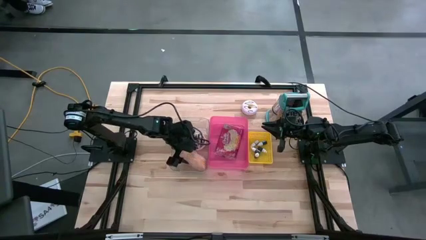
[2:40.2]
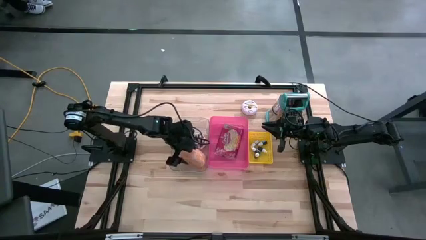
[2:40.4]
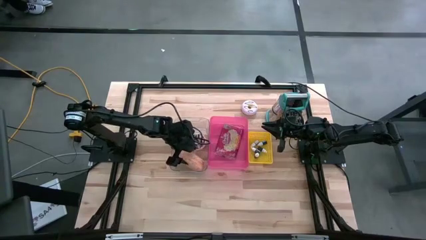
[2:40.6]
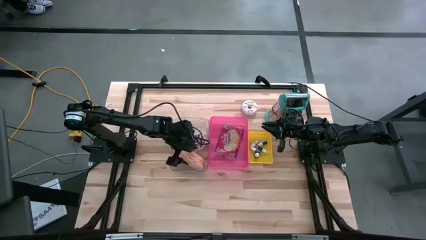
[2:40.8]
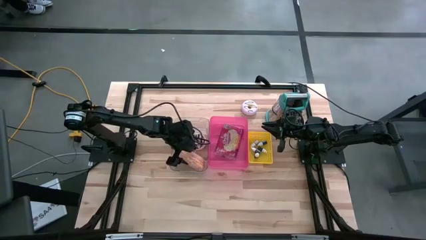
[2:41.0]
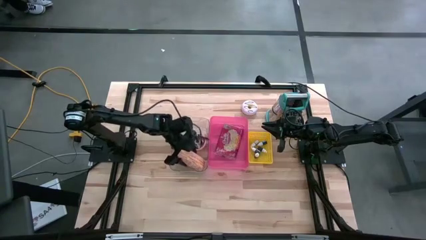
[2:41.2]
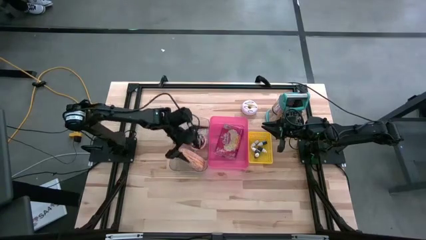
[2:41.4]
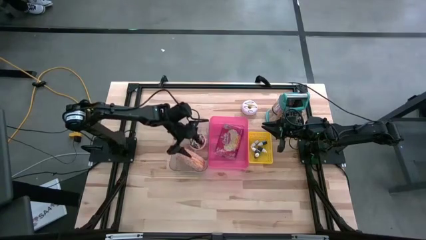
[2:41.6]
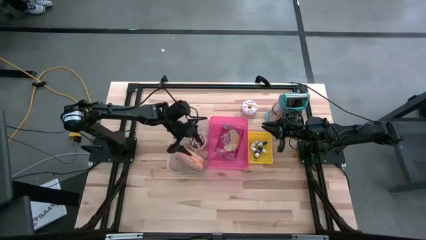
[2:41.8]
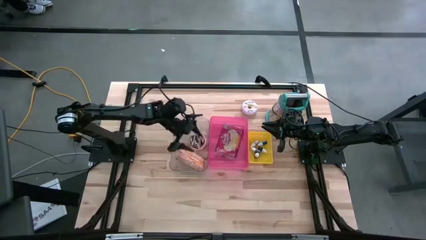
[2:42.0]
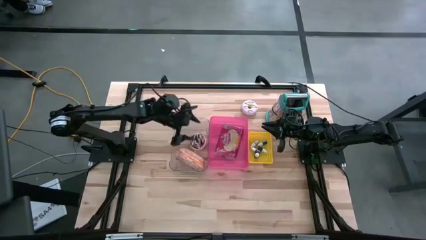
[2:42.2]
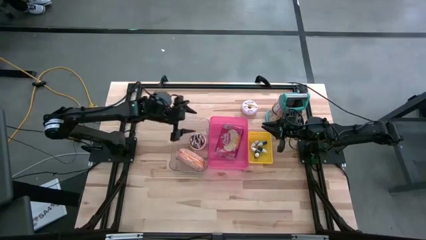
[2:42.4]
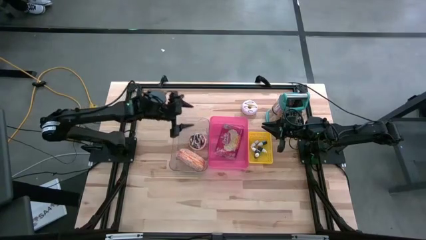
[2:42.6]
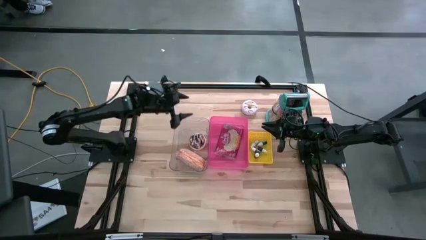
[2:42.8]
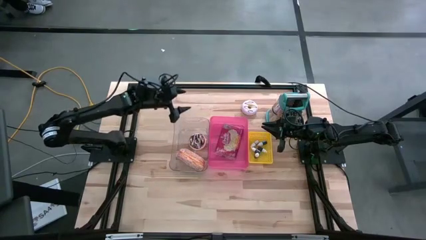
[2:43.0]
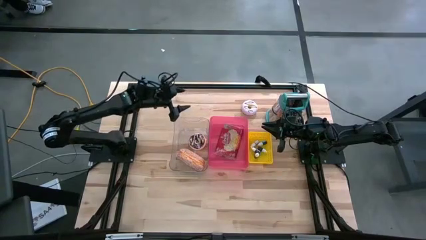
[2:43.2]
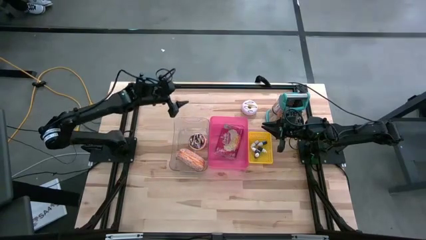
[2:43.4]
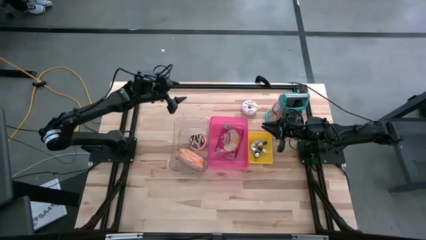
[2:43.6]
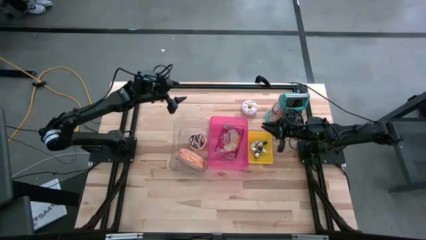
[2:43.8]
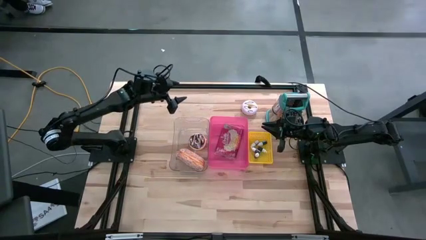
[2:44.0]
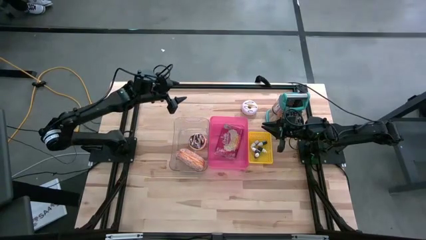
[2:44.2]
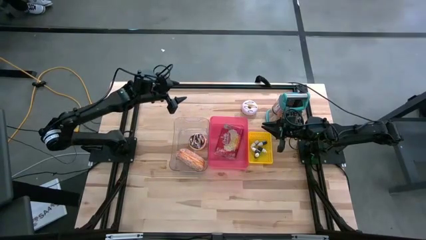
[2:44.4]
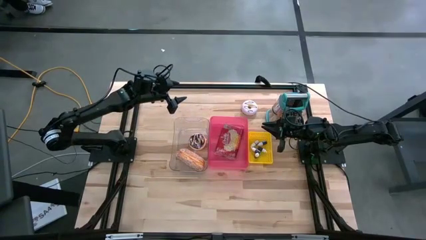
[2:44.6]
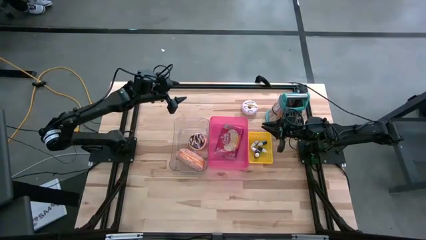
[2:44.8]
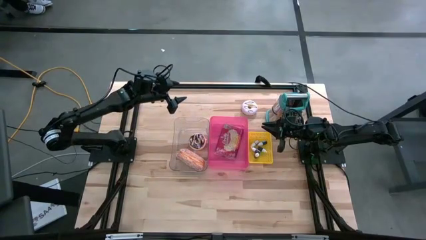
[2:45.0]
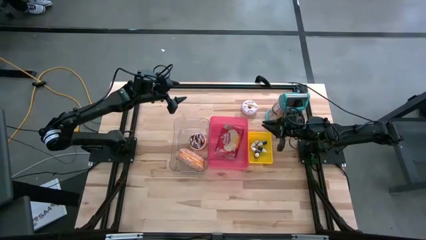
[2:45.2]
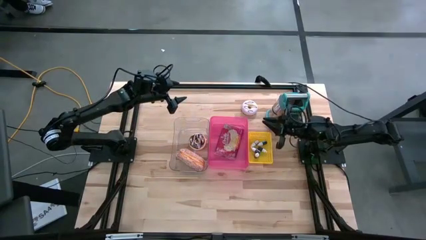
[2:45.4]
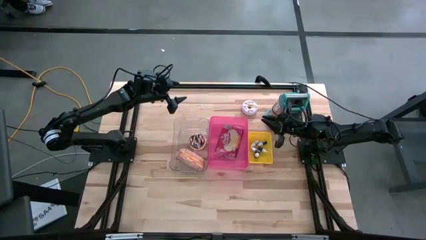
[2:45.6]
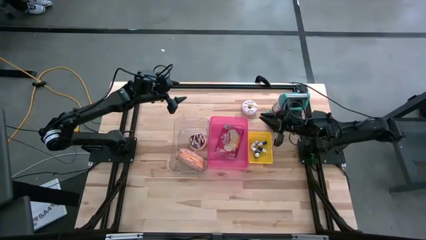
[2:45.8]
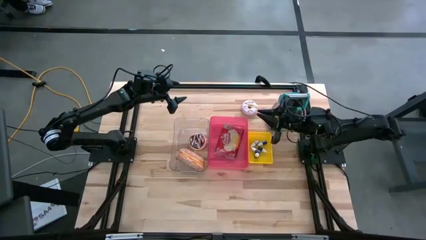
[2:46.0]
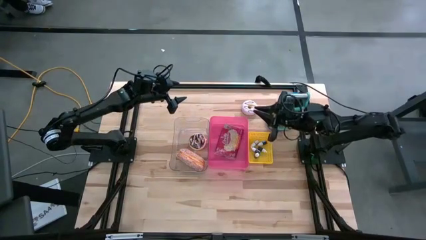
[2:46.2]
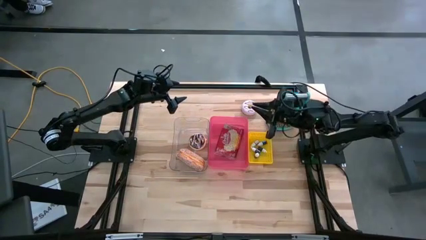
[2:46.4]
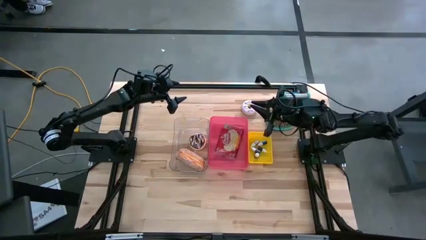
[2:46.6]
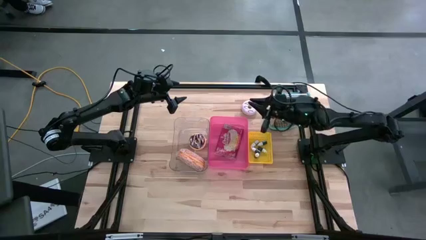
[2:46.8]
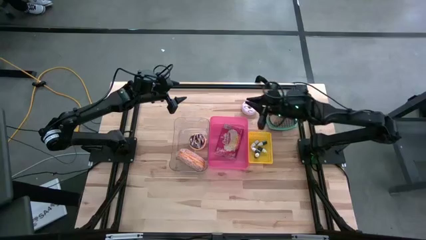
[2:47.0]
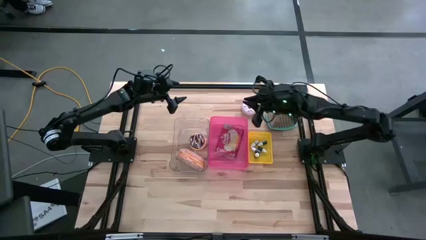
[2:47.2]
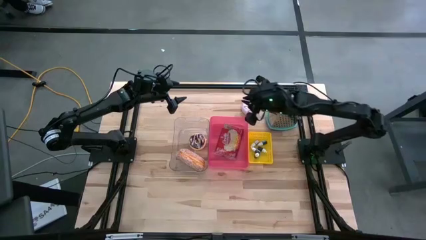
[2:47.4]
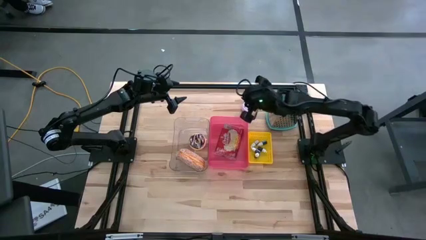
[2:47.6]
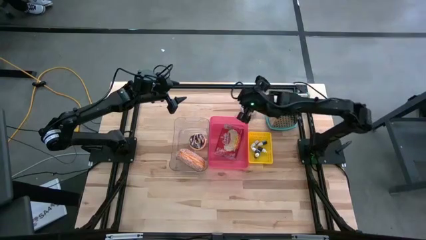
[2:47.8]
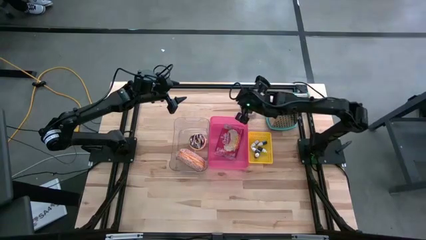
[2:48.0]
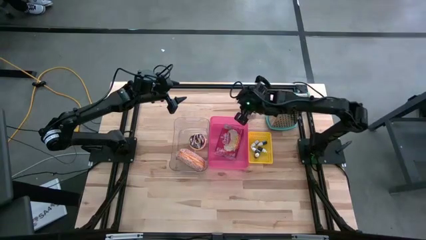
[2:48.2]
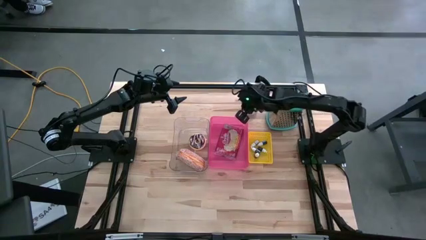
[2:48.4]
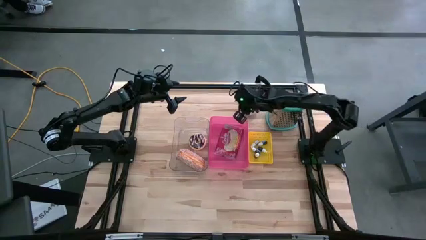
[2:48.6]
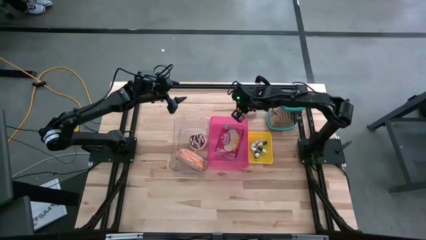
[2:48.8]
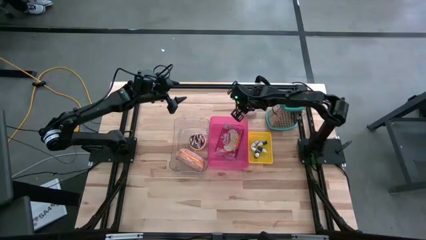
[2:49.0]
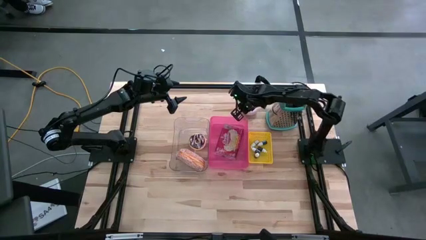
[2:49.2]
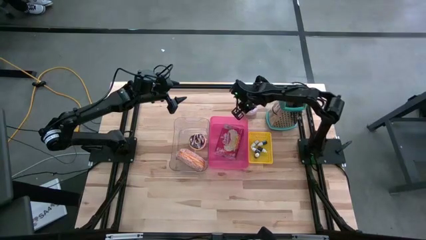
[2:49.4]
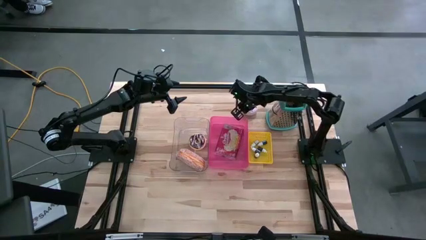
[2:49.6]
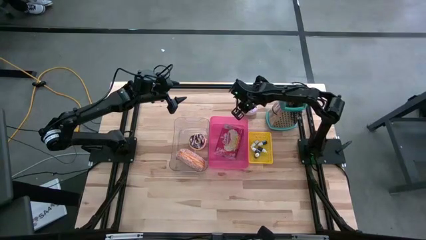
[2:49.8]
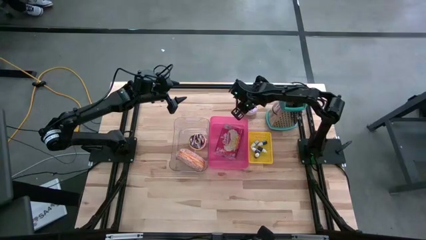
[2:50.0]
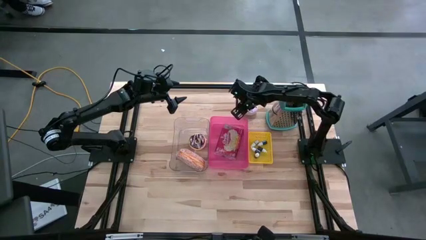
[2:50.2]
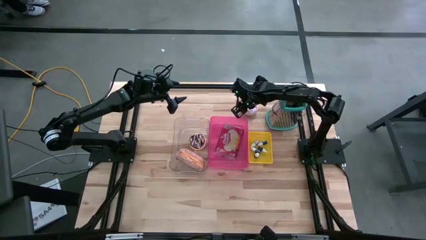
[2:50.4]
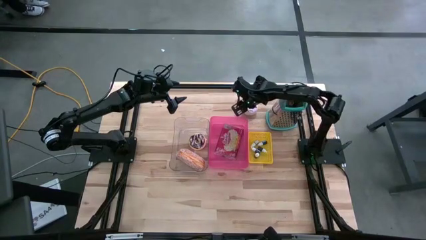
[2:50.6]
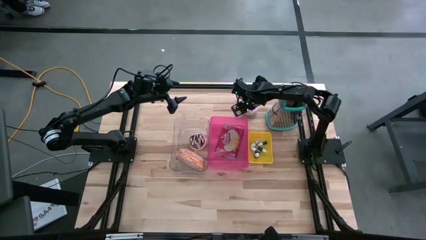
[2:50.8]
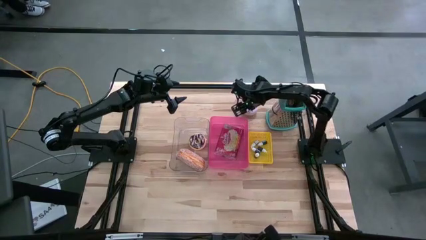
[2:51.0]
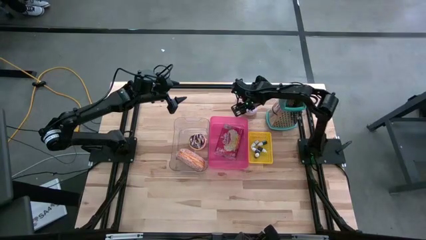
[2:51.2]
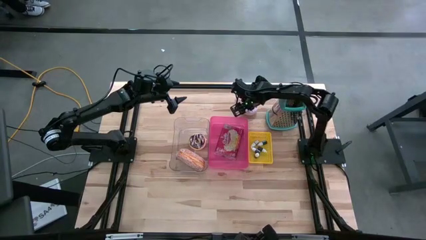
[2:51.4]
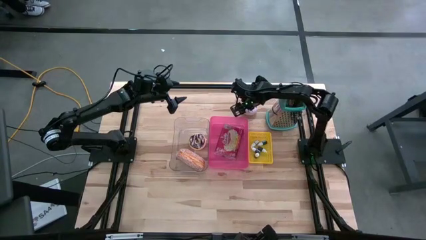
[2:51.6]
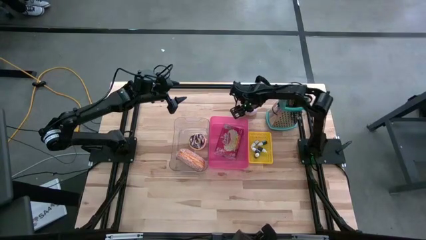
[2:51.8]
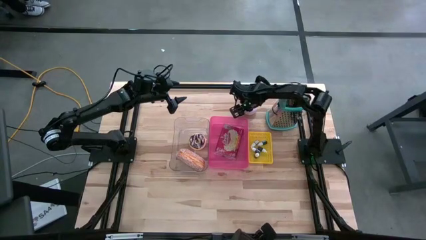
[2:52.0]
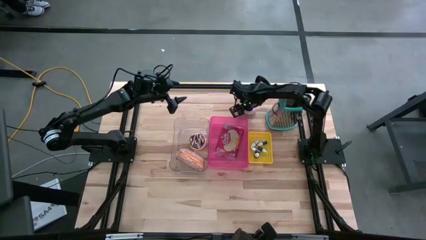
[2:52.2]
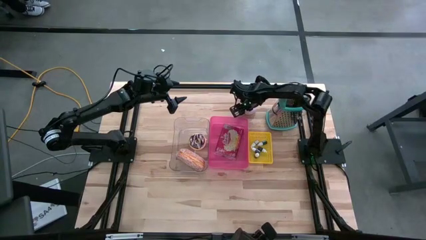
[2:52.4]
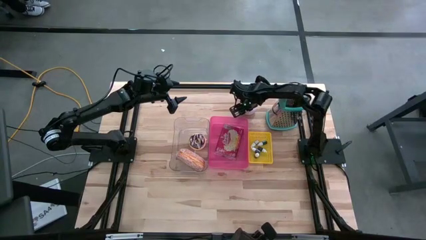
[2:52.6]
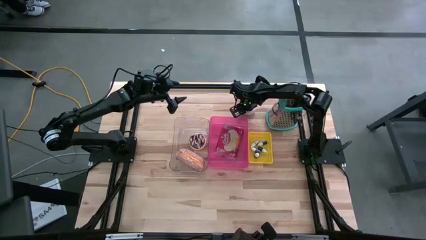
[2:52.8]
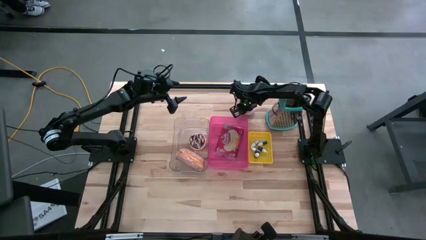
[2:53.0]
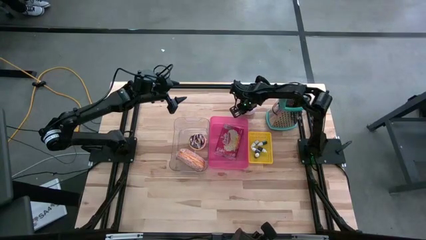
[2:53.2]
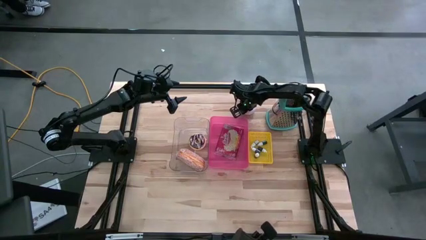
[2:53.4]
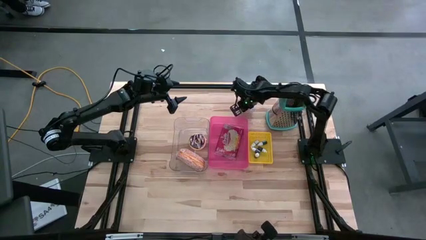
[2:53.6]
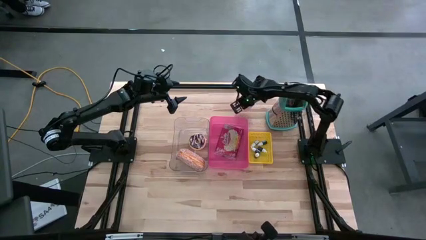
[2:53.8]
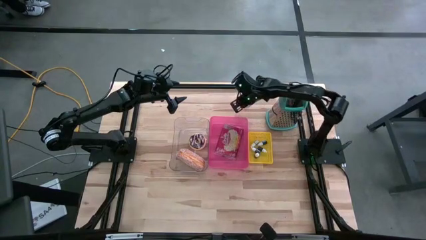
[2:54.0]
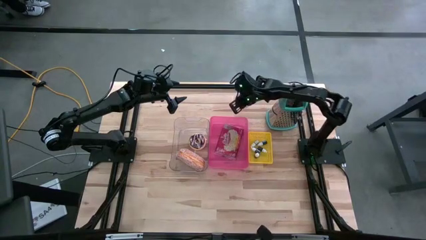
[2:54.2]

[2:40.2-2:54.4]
Put the white donut into the transparent bin
